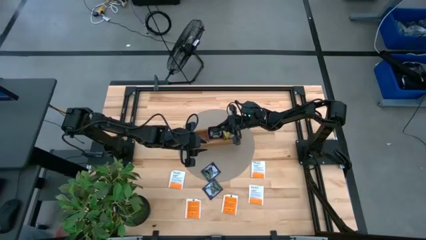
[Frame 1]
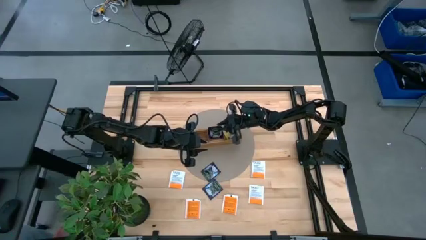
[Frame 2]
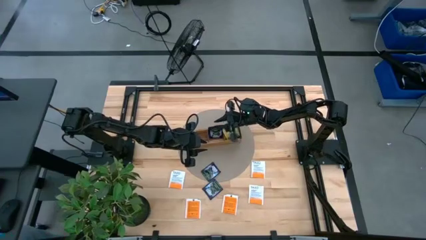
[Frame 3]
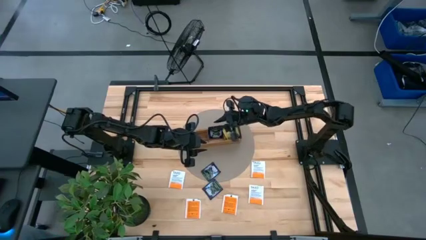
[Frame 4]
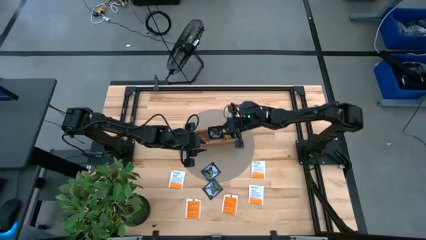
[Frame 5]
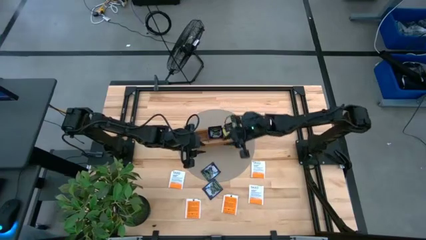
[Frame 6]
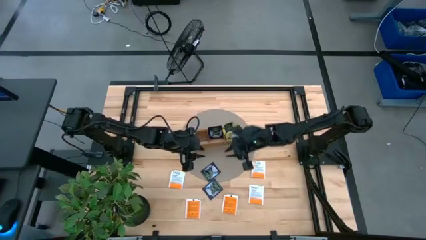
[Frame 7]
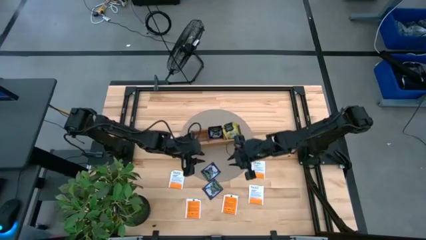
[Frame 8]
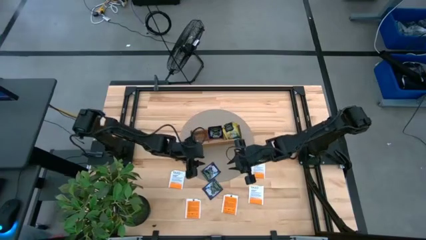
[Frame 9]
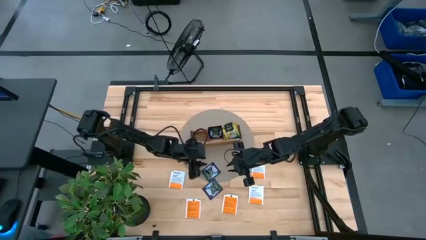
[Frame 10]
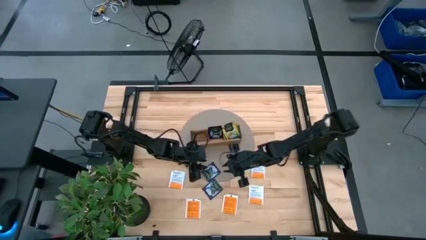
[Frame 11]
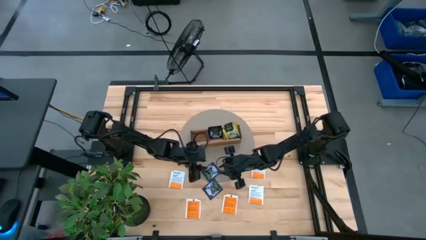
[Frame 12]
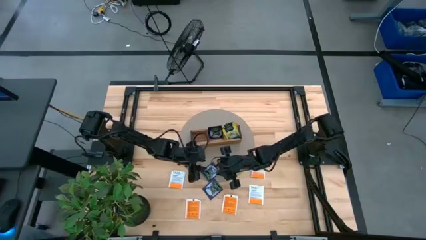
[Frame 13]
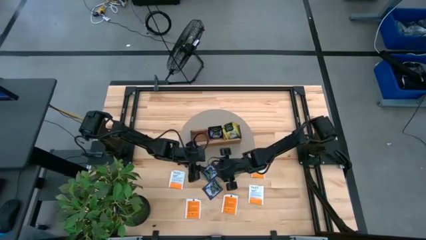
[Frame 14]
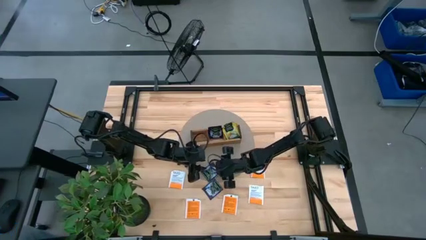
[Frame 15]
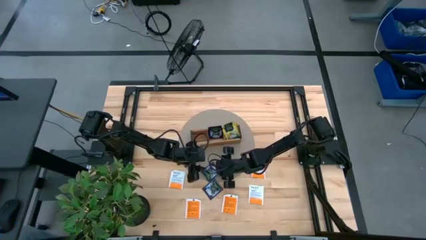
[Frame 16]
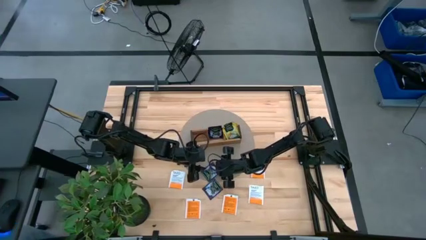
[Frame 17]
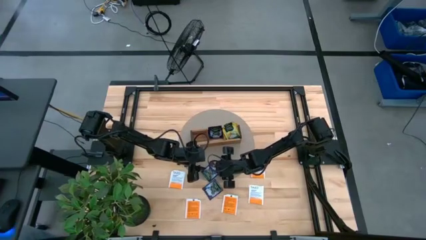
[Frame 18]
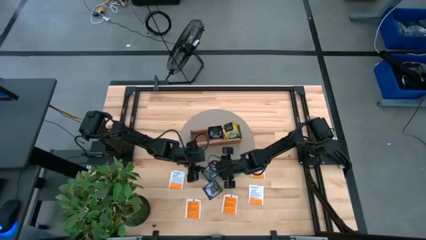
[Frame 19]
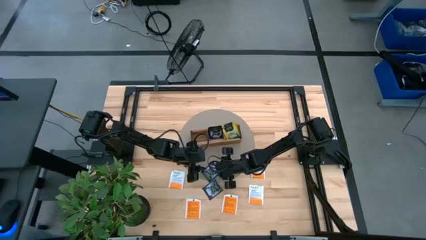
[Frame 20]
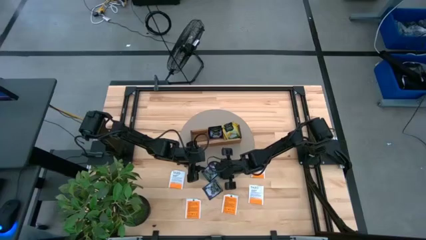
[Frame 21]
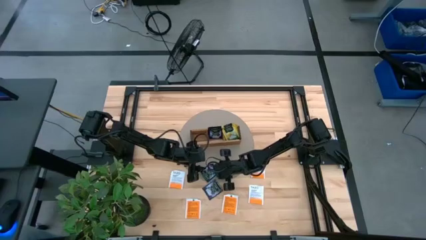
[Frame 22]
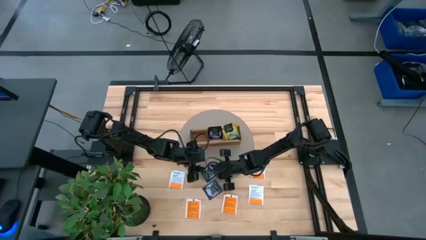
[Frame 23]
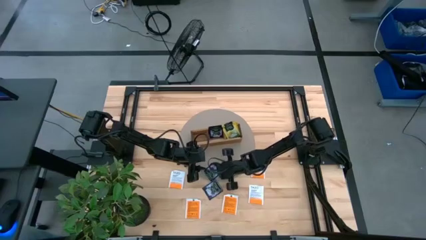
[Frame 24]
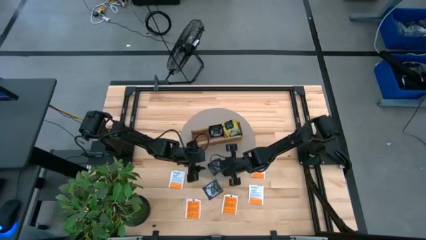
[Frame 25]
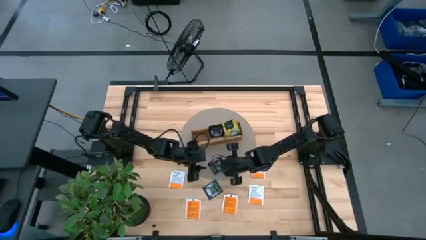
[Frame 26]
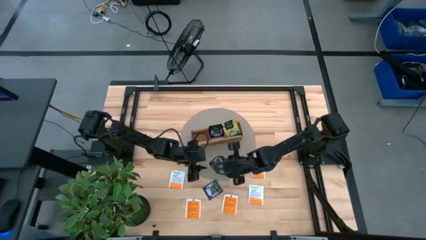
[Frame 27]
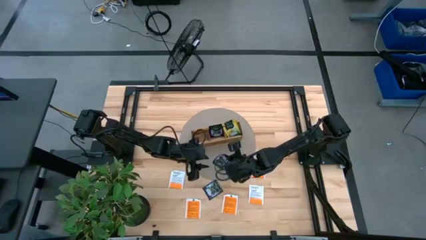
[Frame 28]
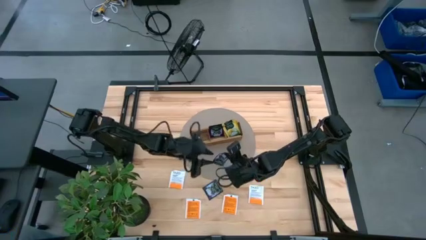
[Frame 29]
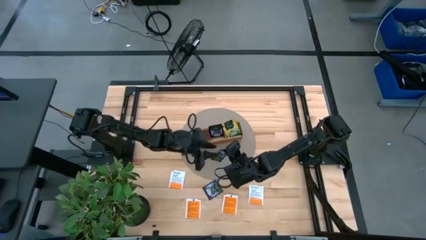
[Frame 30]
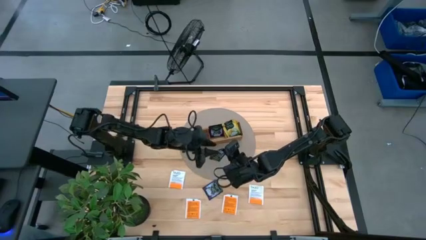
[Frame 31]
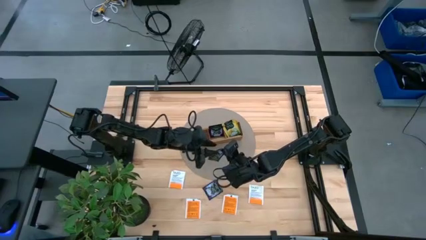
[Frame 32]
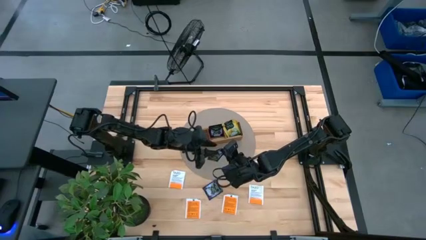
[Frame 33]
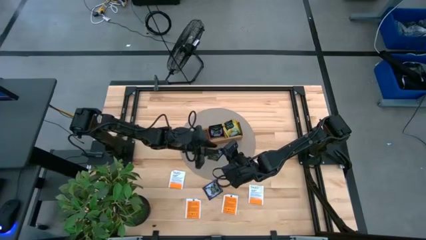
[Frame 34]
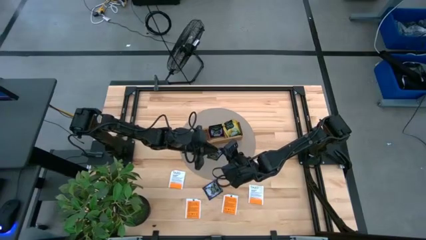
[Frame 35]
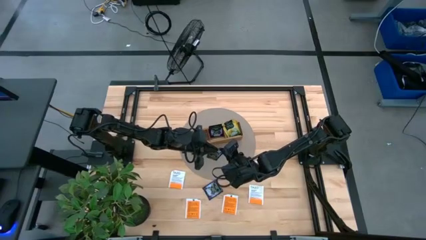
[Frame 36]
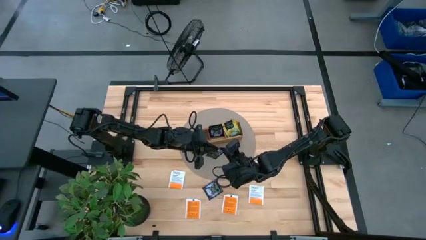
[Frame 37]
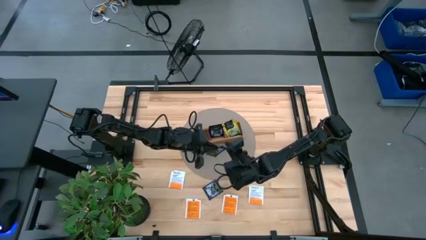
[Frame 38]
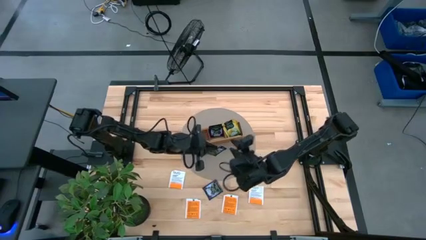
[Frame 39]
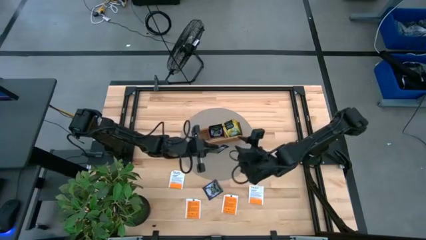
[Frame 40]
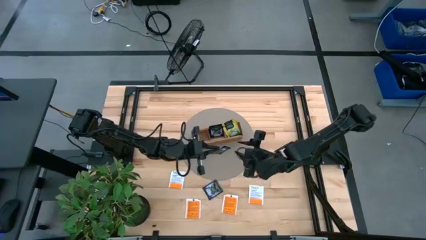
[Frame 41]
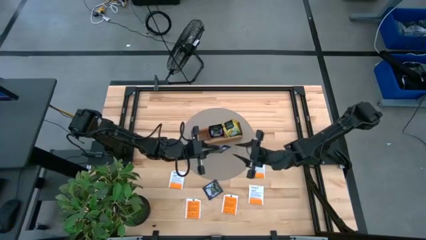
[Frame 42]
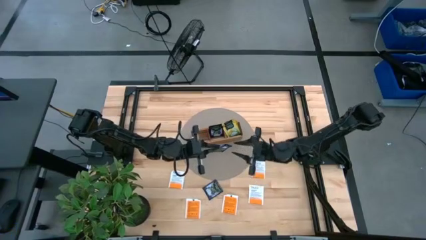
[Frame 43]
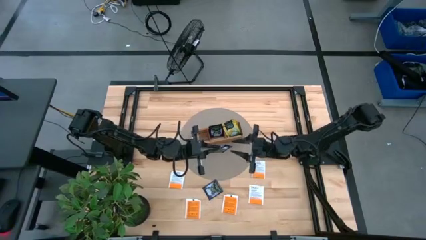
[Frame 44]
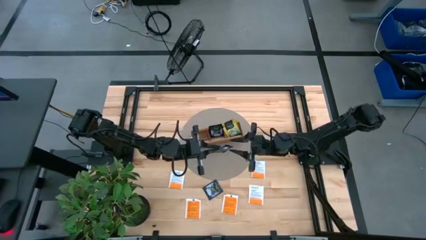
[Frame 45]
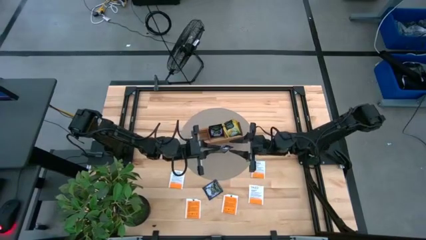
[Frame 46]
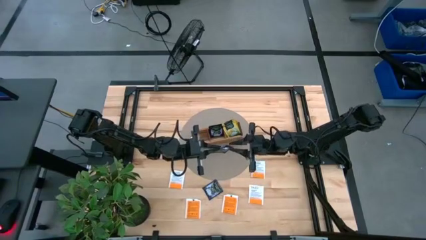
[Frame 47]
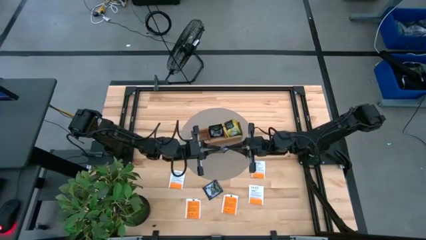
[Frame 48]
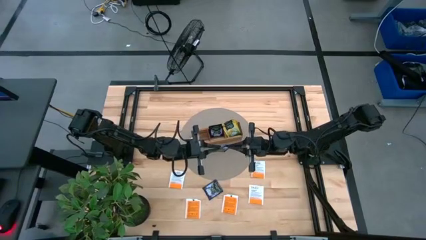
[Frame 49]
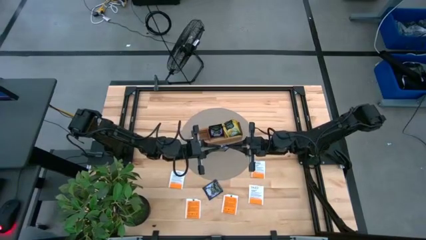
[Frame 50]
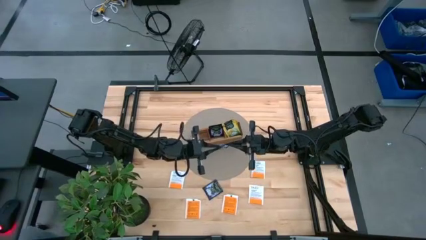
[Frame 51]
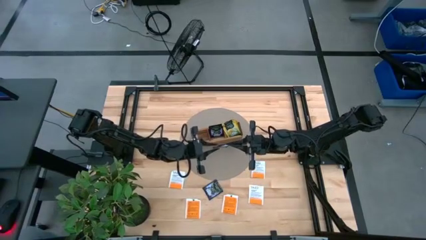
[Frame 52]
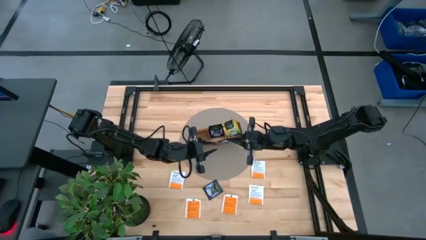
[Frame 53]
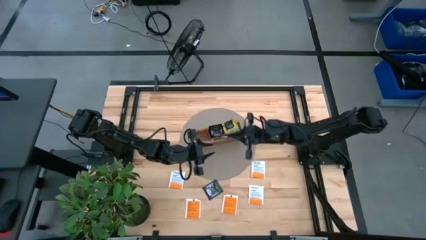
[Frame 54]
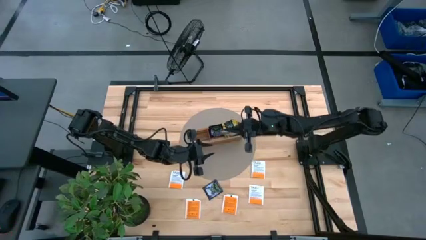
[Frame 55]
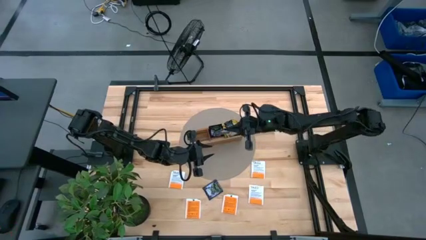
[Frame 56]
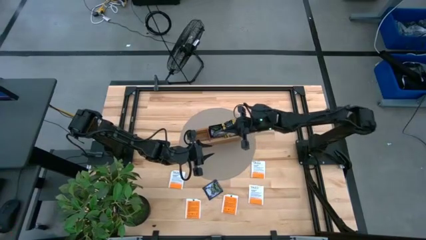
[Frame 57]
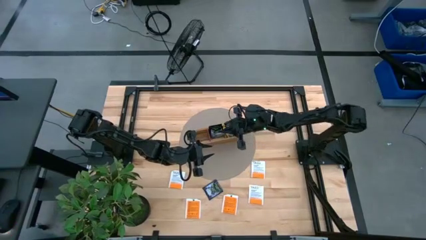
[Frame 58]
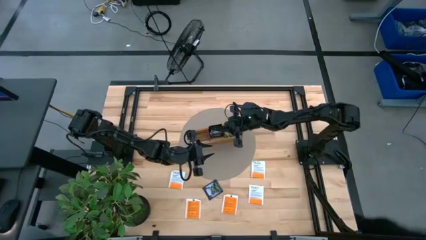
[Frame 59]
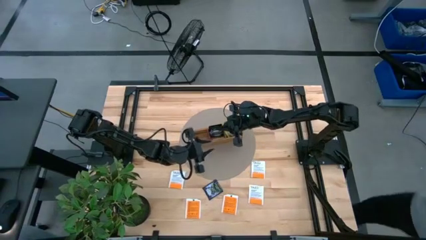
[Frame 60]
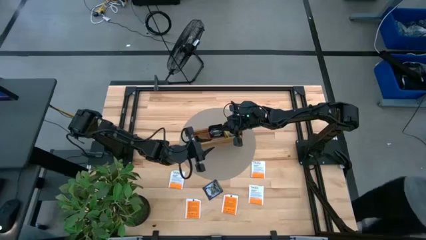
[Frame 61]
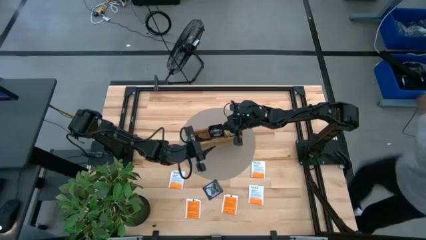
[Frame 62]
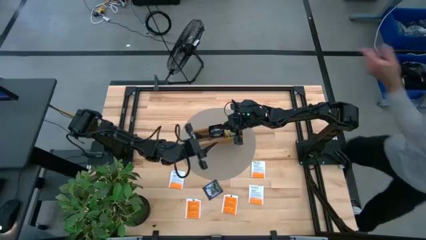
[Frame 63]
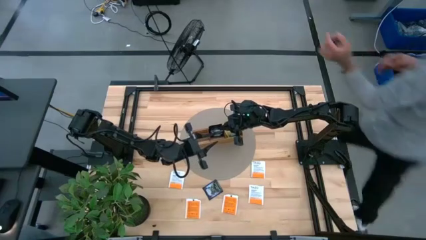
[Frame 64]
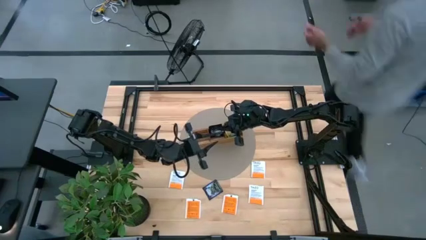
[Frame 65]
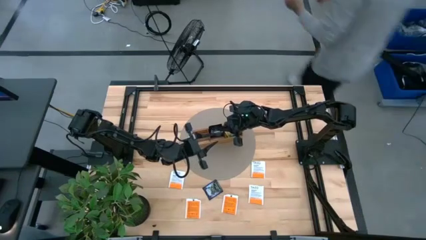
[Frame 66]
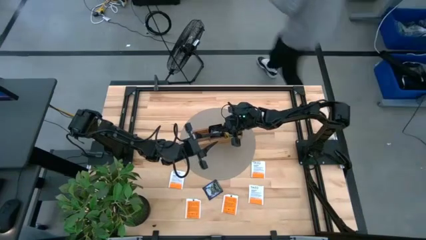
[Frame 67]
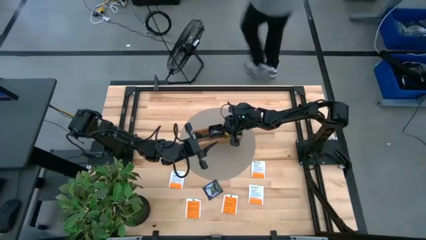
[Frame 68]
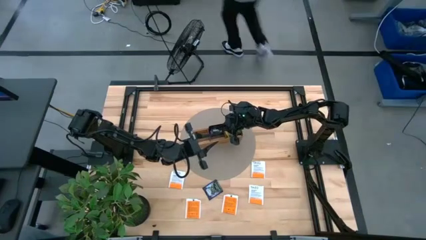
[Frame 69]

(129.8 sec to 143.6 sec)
Task: Pick & Place Tea
Put the violet tea bag into the middle section of the wooden organizer

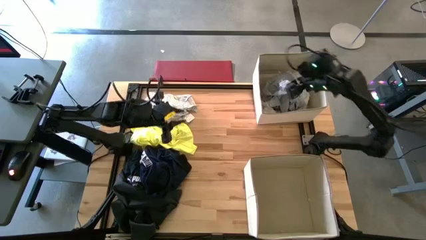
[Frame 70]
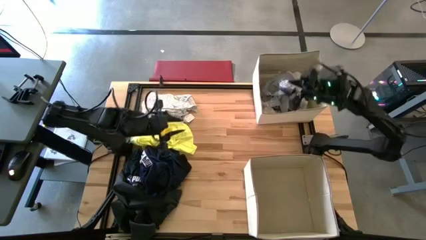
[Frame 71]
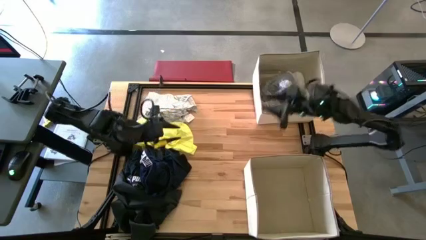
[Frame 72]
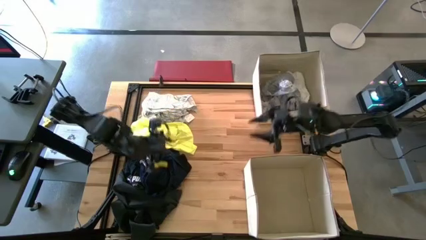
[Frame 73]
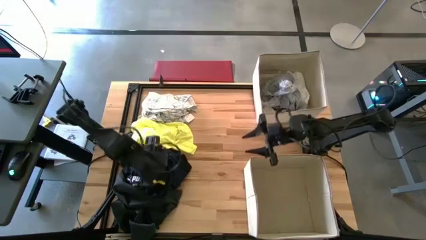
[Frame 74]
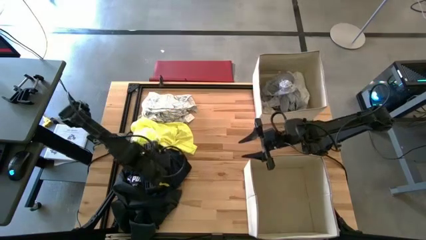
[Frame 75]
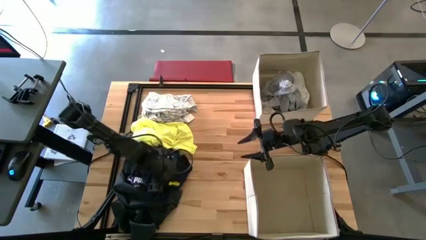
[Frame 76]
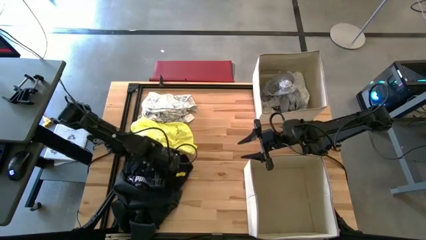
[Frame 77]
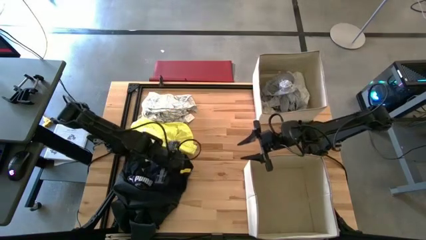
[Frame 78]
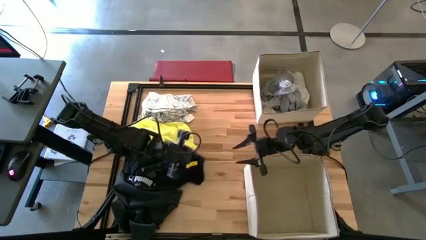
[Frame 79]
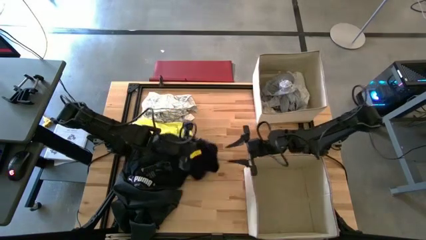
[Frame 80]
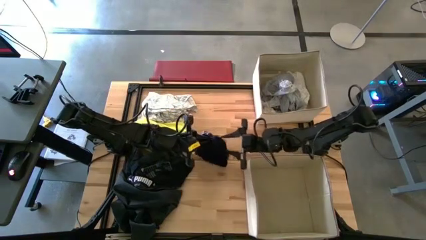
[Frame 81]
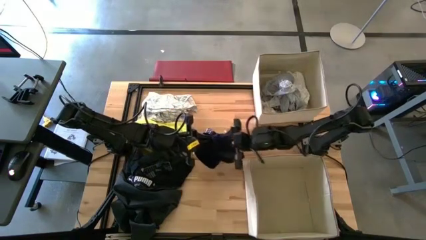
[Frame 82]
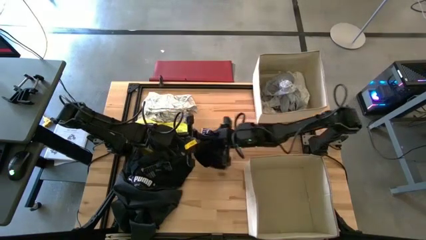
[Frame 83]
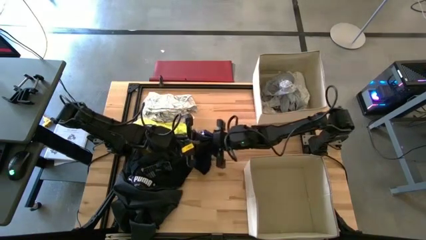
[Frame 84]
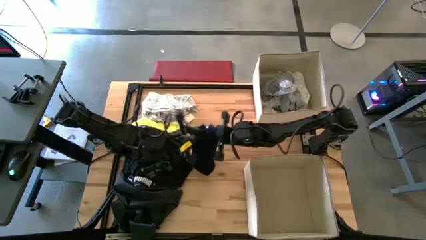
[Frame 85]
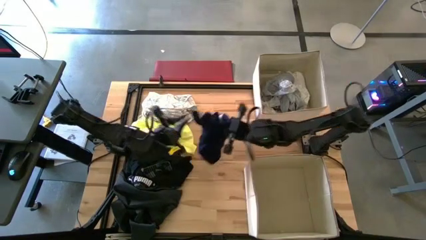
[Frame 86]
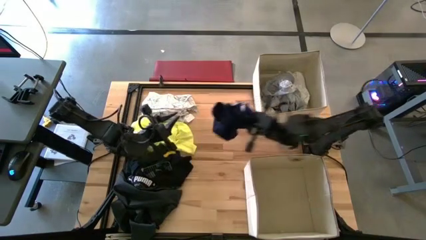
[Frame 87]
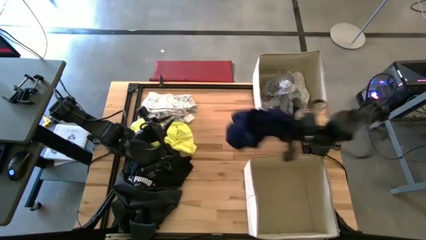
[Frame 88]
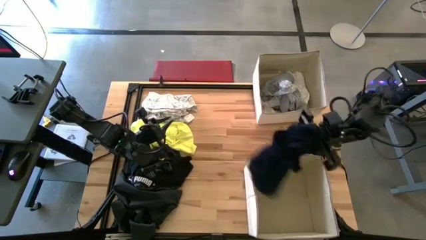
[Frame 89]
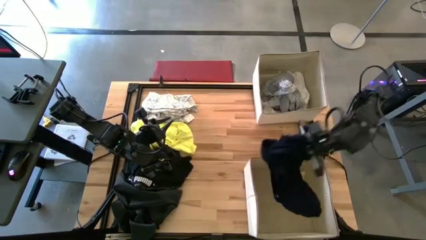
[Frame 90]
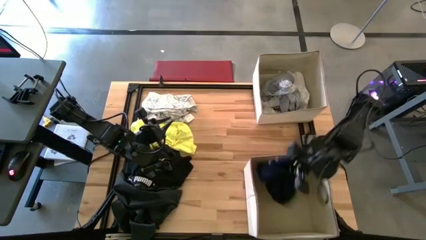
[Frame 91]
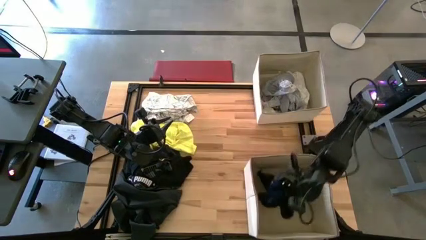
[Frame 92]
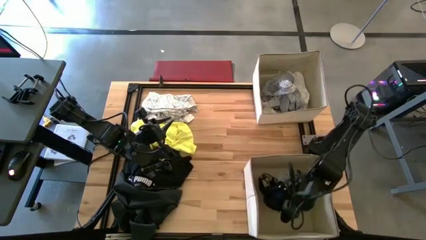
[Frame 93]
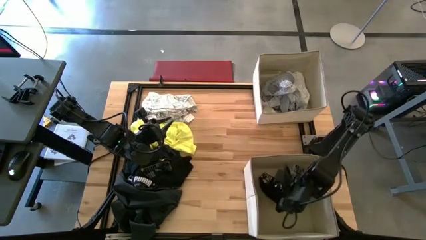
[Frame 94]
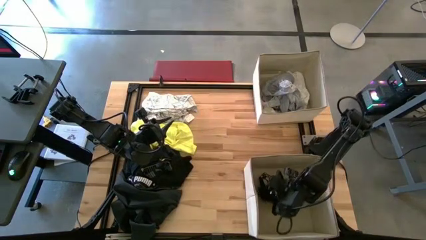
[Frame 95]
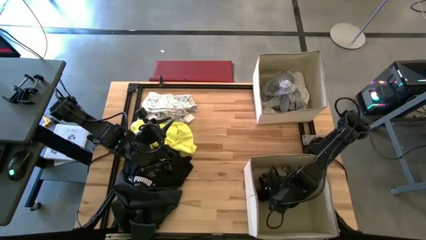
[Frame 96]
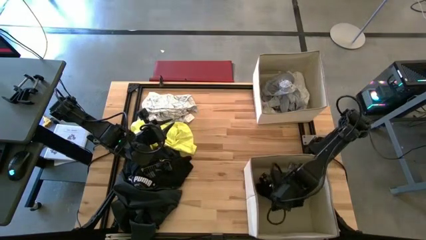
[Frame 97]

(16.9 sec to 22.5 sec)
Task: Sort clothes
Put the black underwear in the bottom white bin
